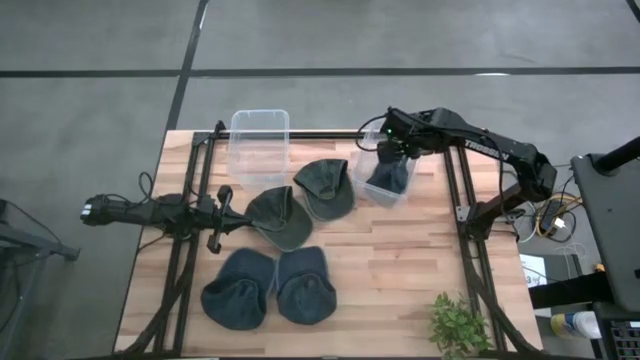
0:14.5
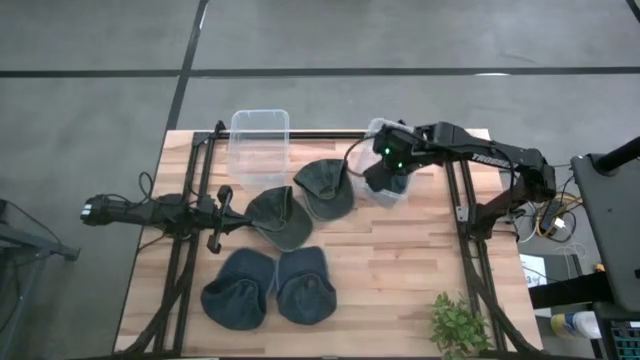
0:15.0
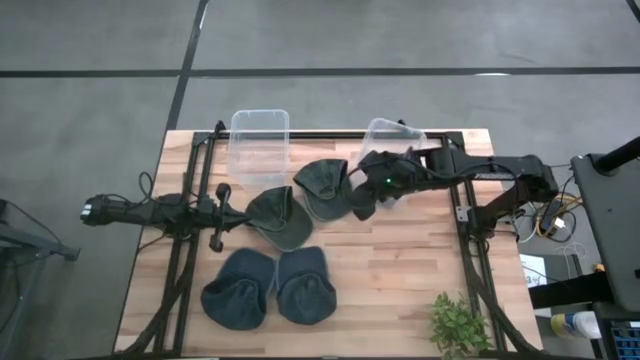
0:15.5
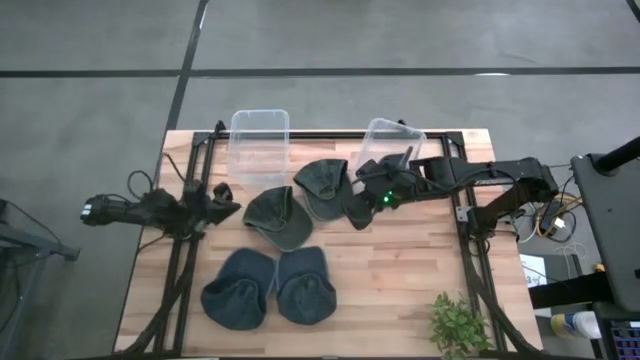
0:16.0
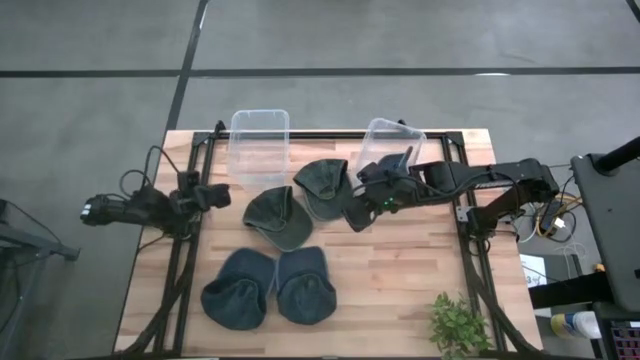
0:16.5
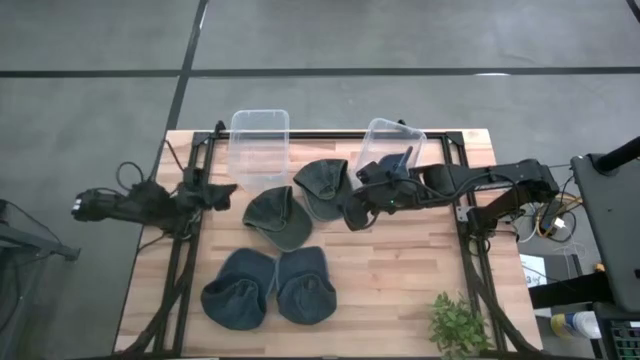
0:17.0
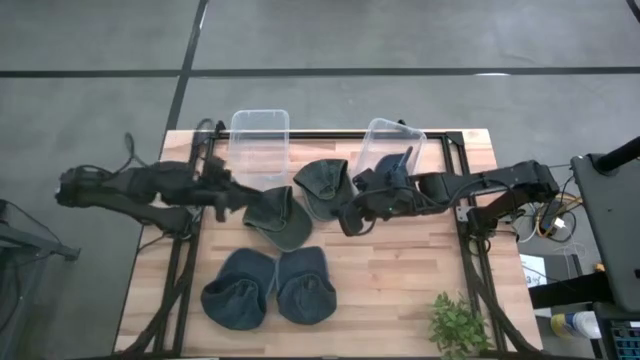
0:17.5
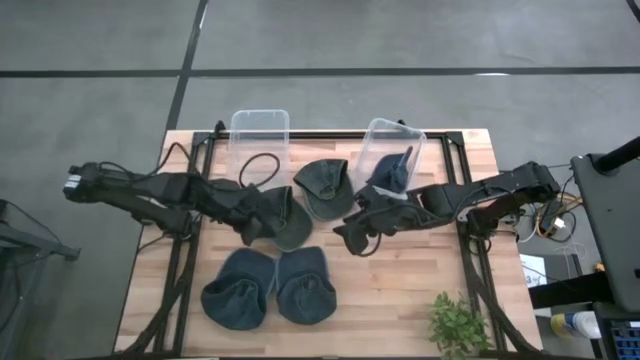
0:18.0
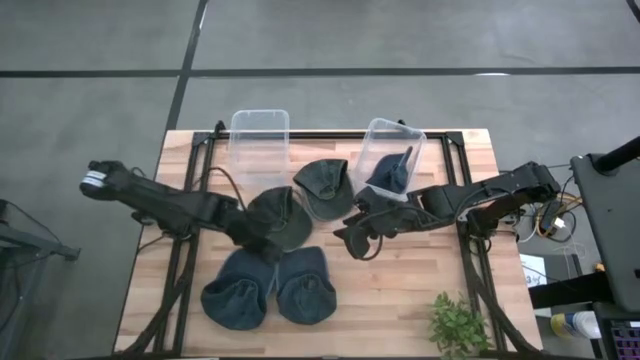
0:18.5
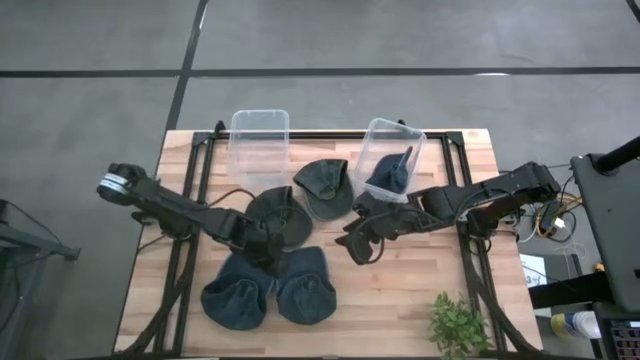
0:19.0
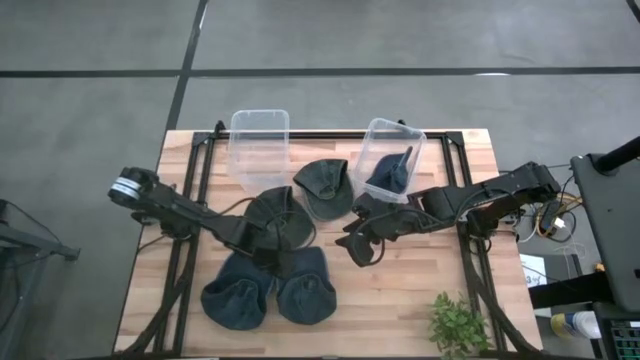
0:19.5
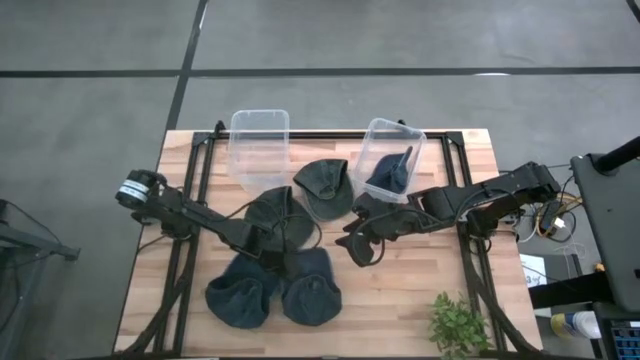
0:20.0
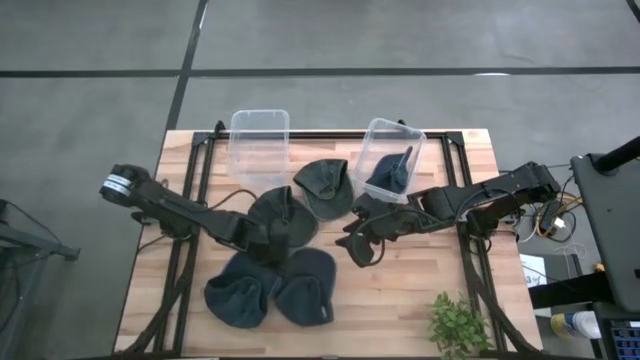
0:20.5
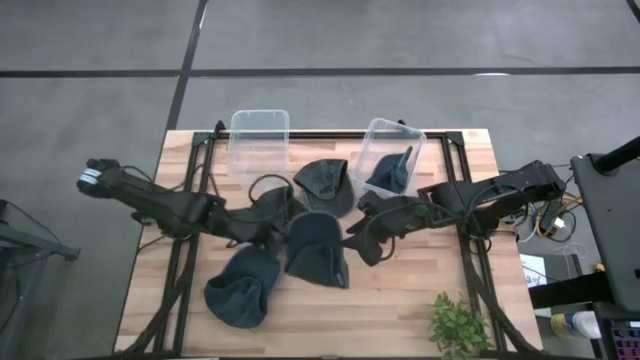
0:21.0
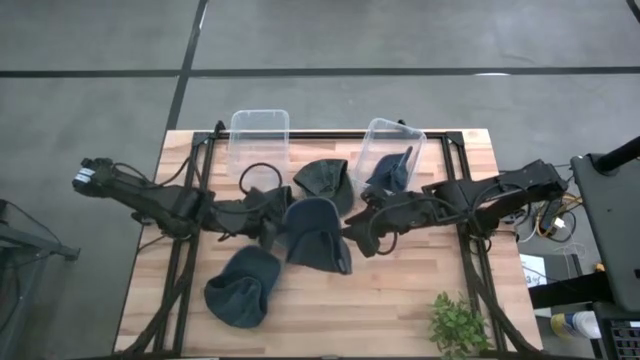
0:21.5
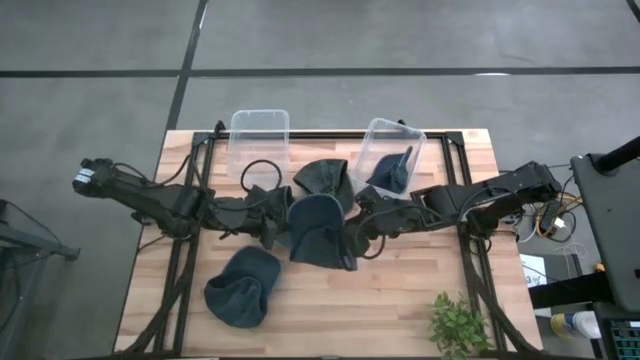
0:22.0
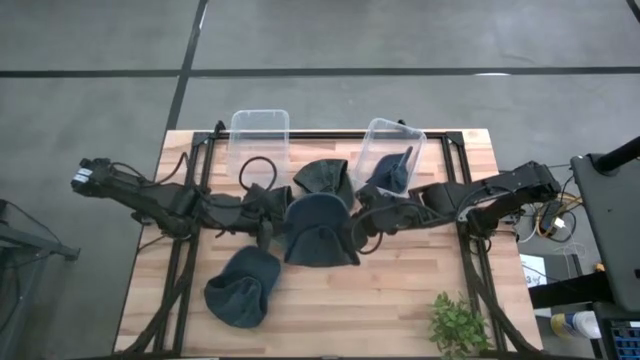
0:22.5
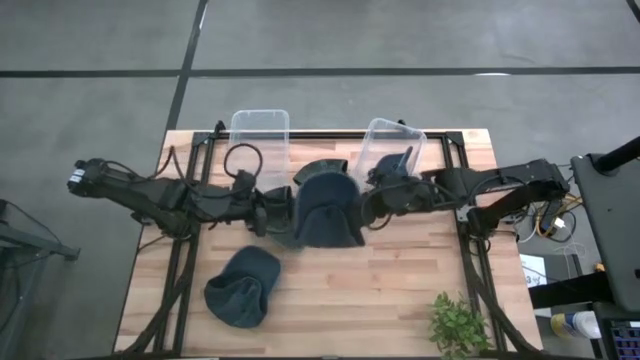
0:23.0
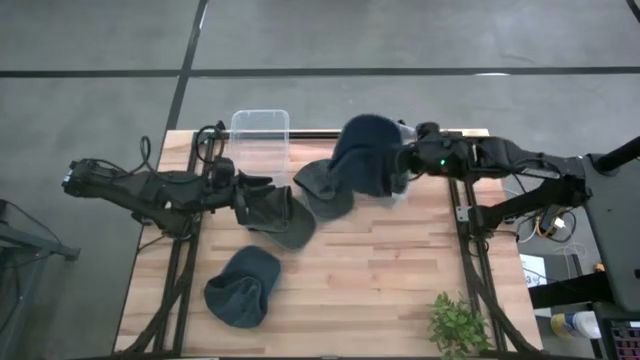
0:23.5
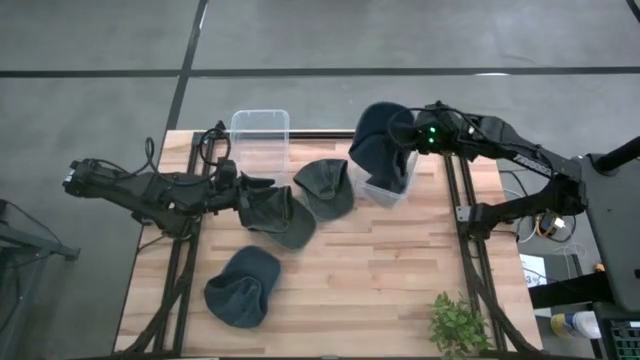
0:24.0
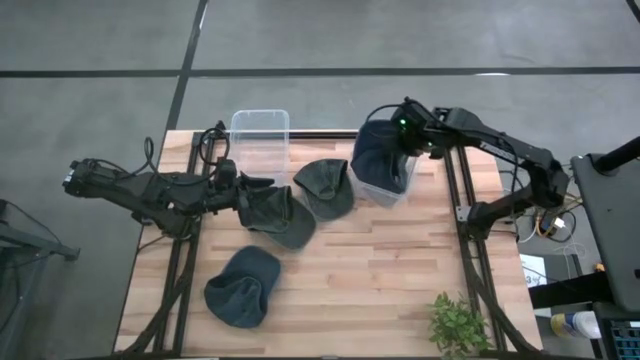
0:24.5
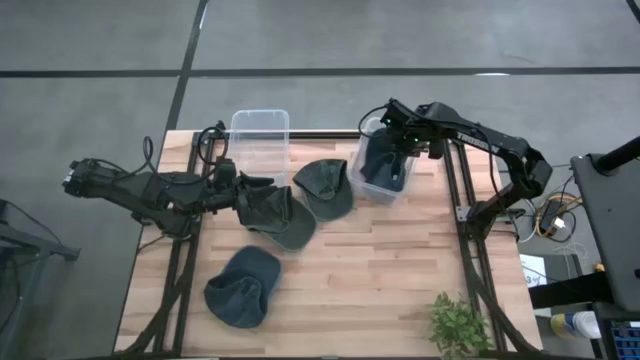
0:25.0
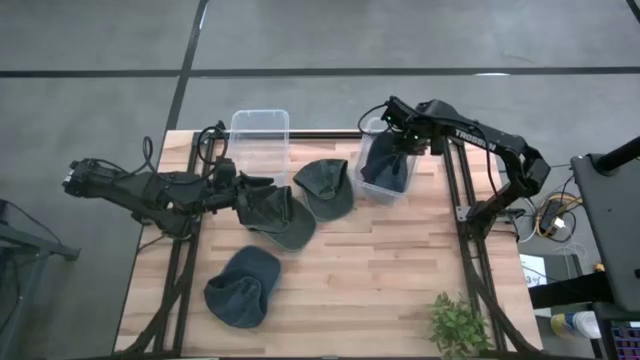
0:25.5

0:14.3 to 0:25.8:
Task: Pick & Place hat
Put the right blue cap into the right transparent bin

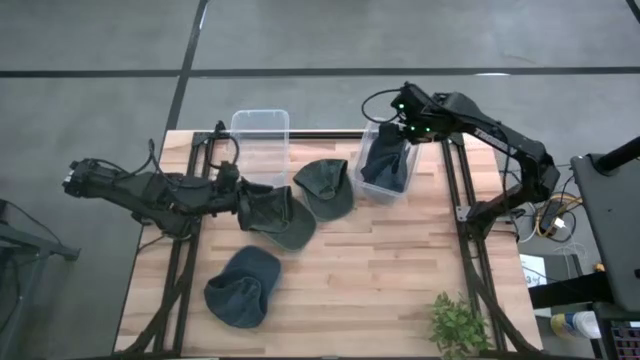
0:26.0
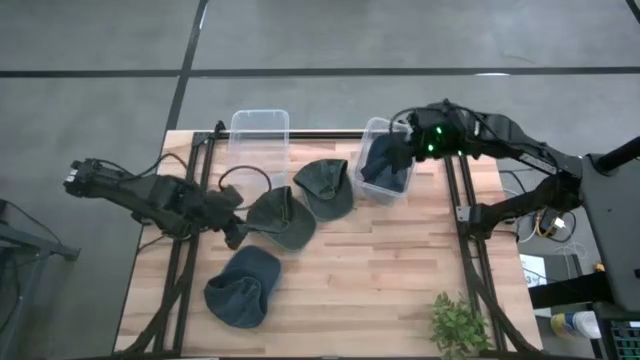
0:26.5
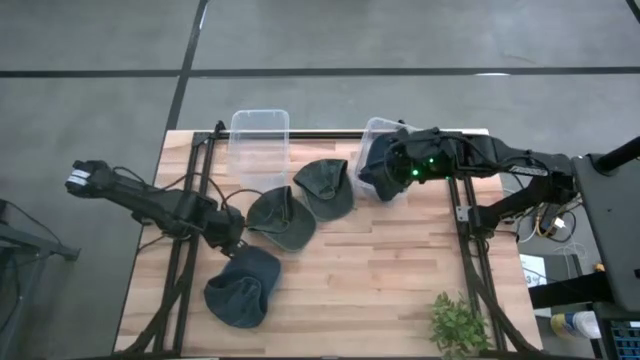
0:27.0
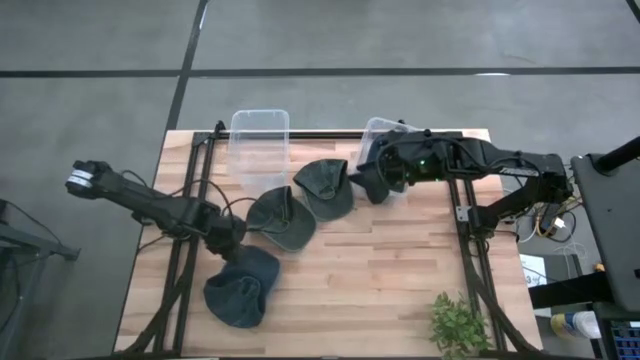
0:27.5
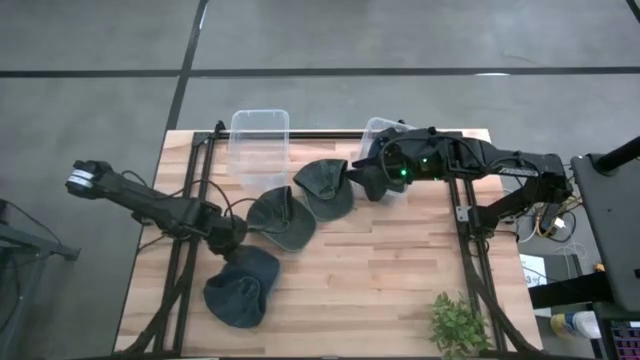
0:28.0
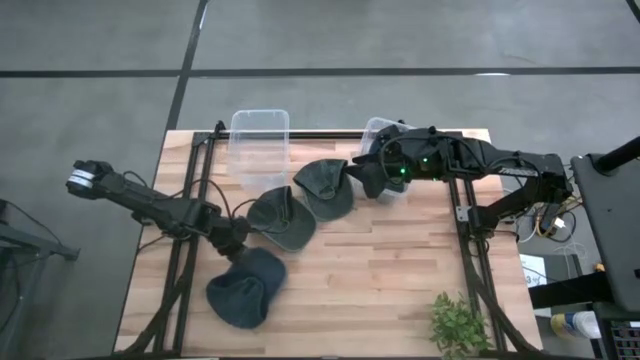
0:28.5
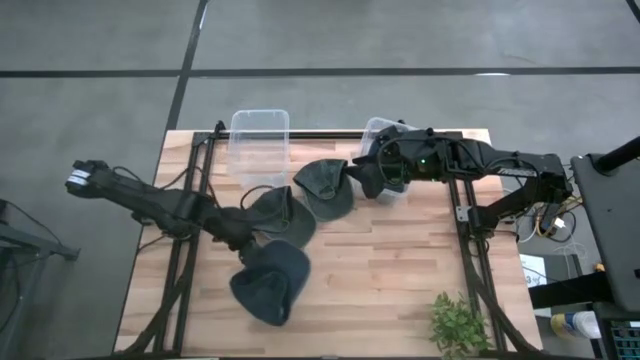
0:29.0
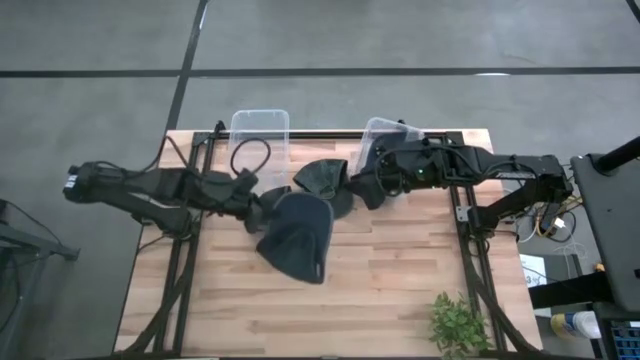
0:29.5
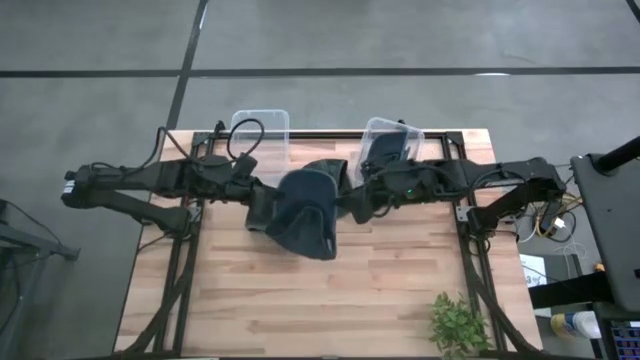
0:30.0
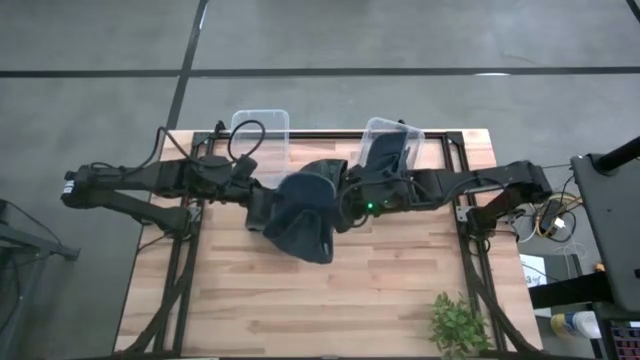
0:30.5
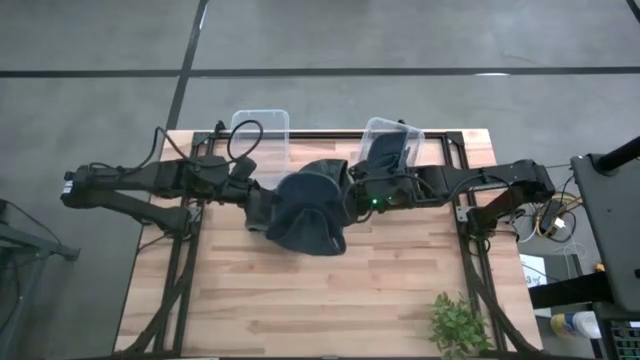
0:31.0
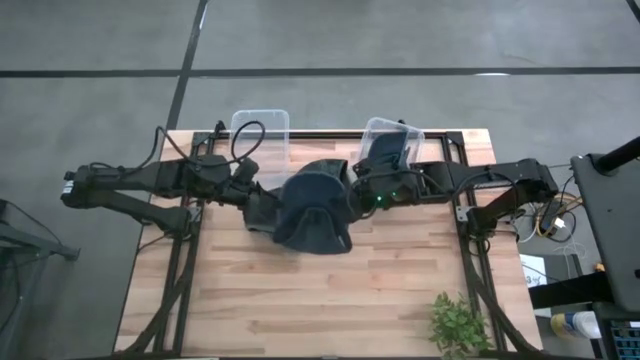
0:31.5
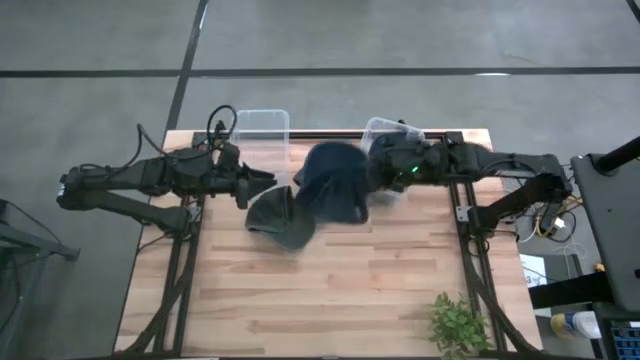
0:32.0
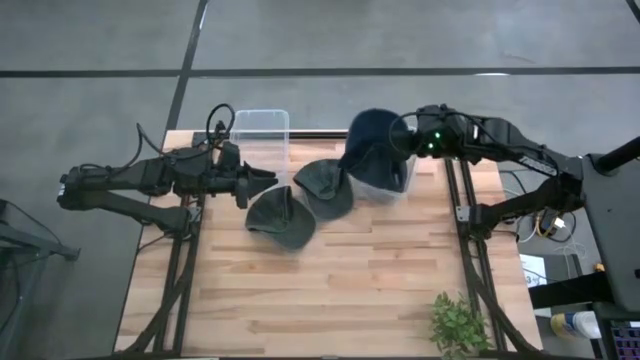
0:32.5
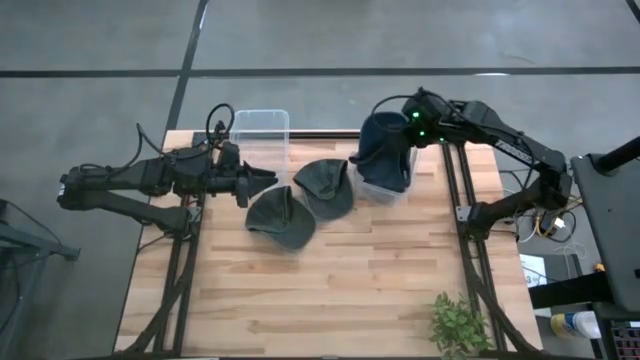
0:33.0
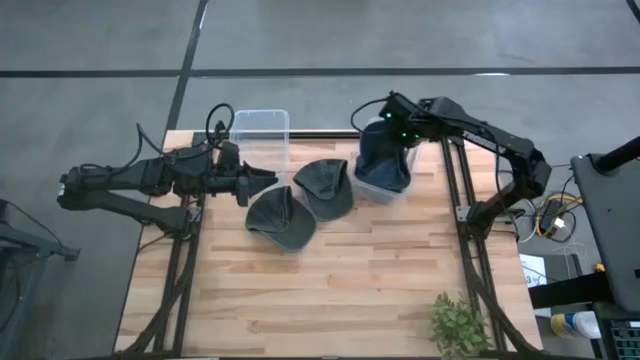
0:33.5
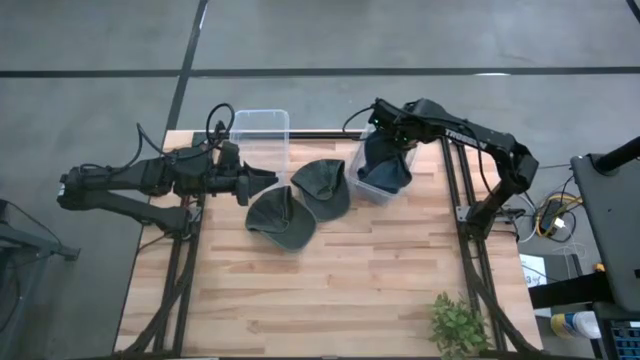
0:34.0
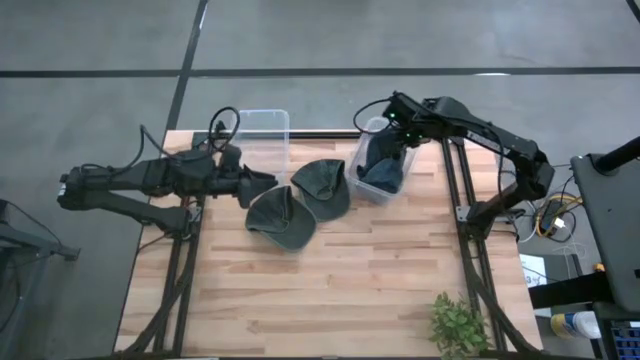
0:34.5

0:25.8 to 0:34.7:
Put the blue cap into the right transparent bin

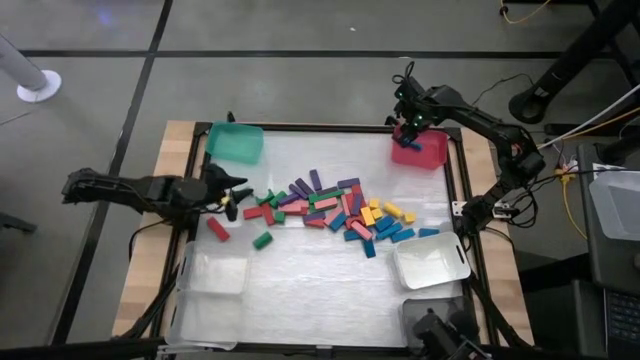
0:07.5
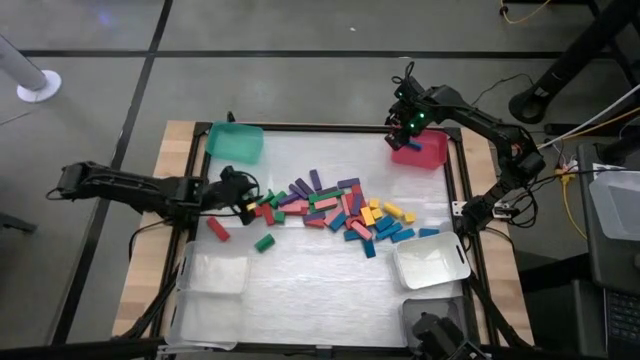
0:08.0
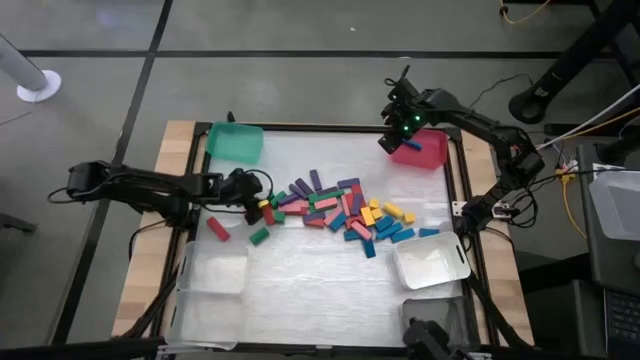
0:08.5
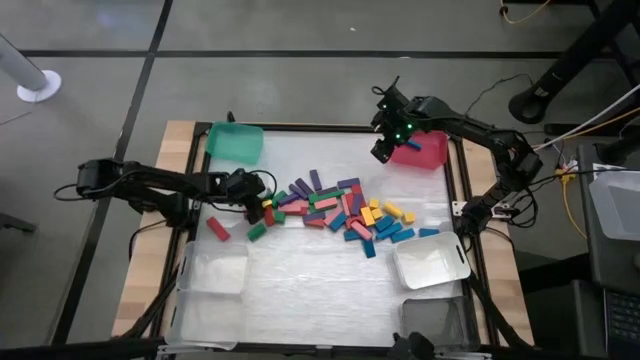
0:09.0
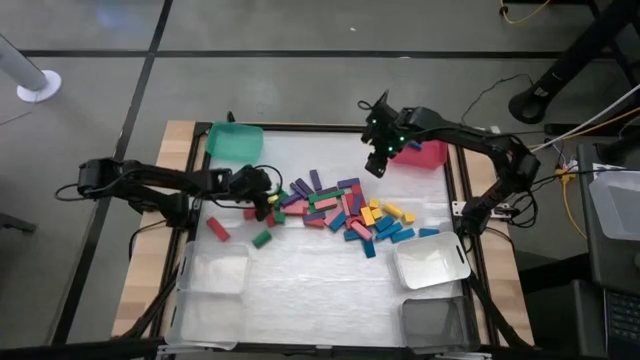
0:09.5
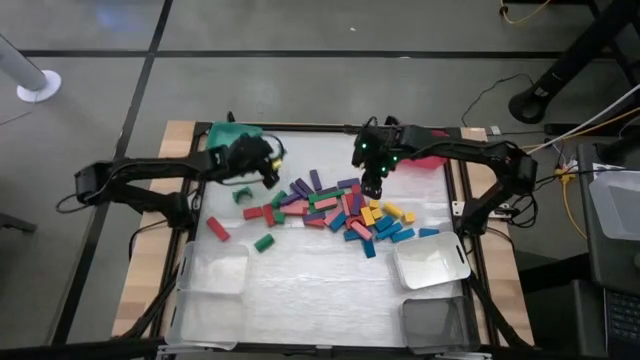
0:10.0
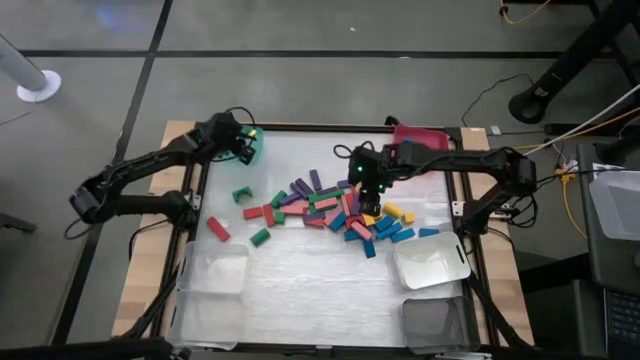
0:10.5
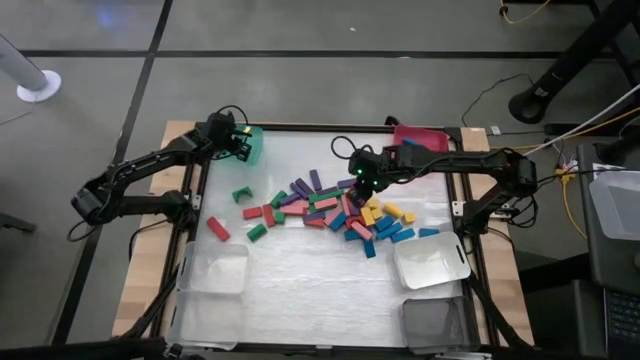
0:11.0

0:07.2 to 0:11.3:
Task: Sort blocks
Put the green block into the green bin
